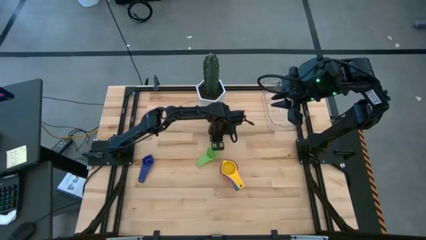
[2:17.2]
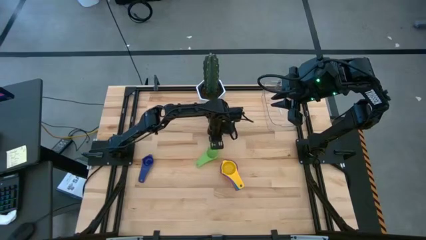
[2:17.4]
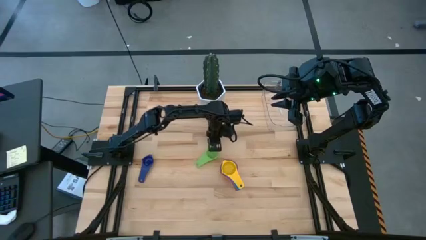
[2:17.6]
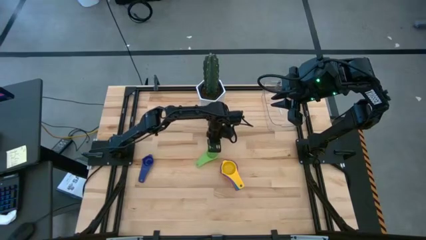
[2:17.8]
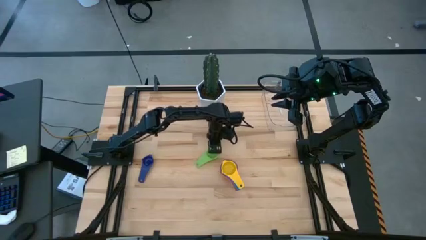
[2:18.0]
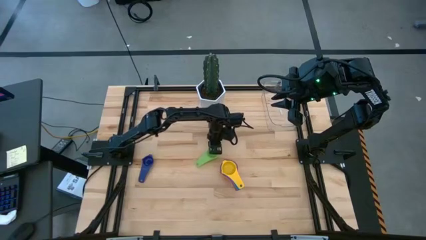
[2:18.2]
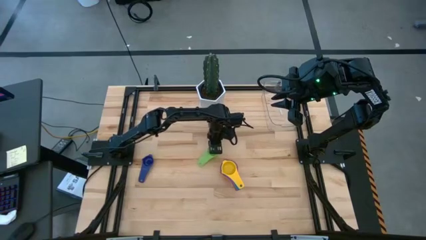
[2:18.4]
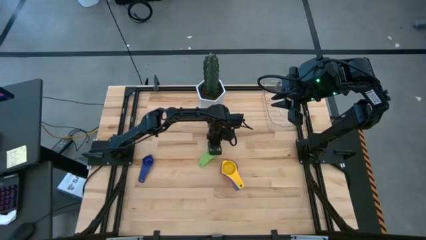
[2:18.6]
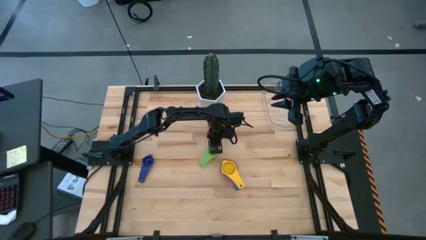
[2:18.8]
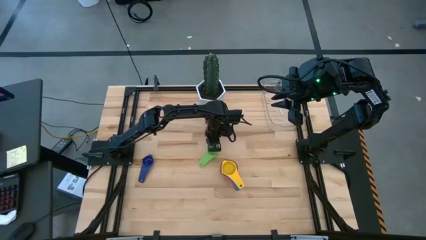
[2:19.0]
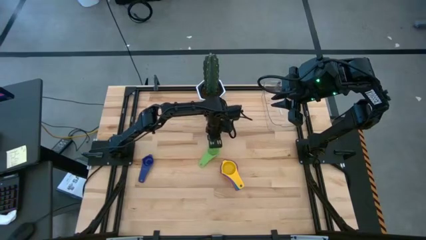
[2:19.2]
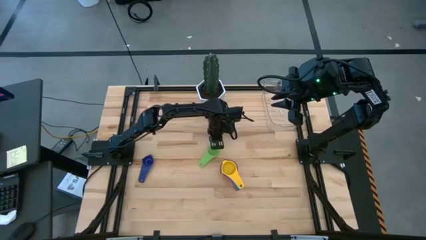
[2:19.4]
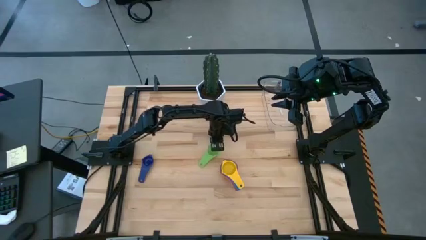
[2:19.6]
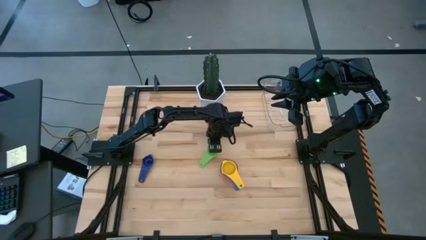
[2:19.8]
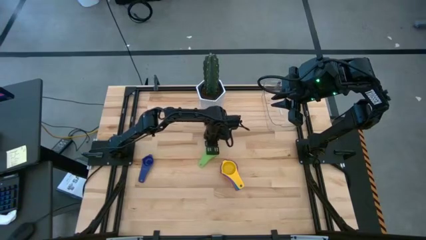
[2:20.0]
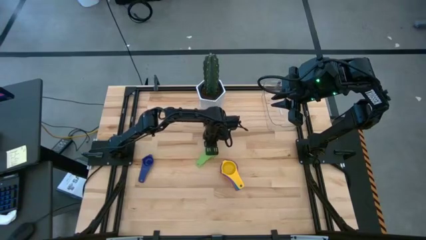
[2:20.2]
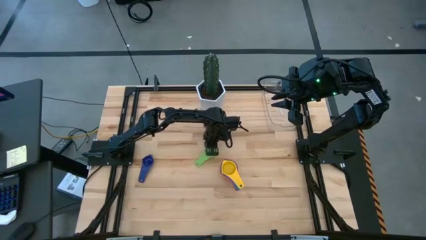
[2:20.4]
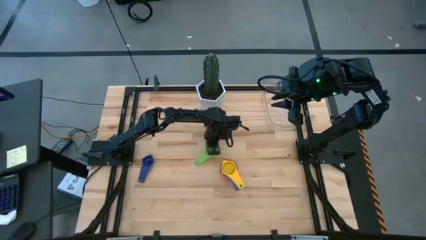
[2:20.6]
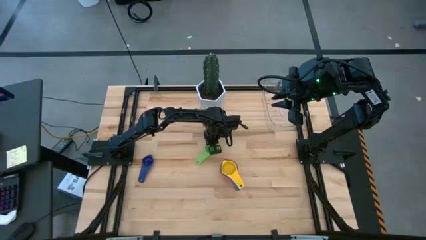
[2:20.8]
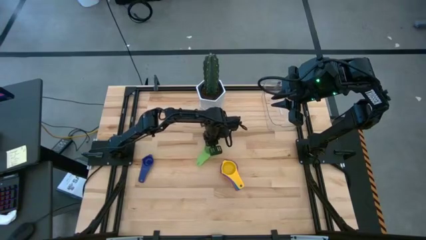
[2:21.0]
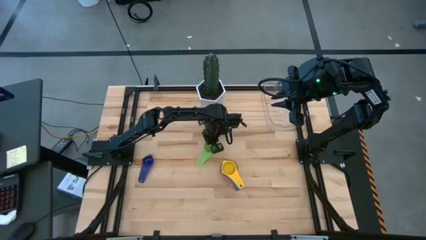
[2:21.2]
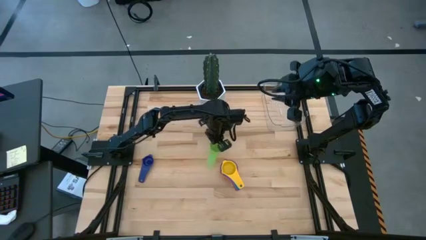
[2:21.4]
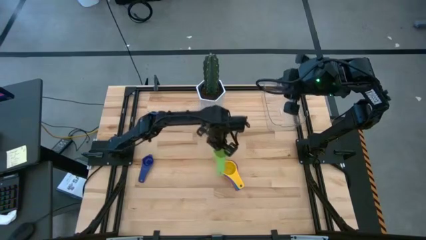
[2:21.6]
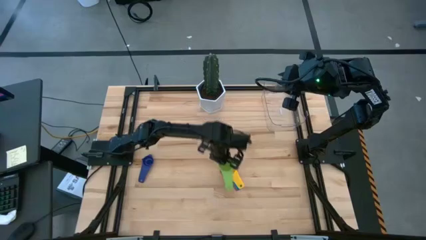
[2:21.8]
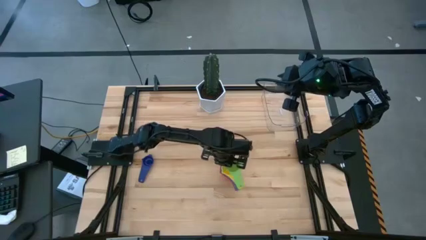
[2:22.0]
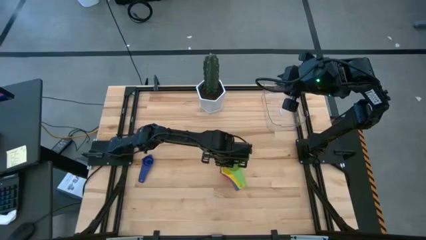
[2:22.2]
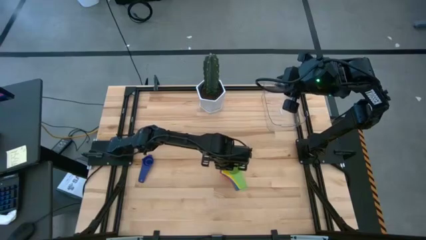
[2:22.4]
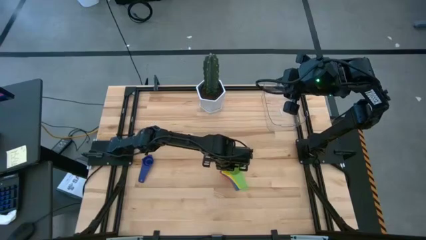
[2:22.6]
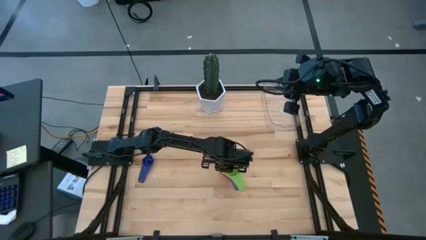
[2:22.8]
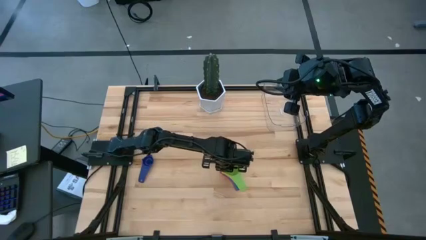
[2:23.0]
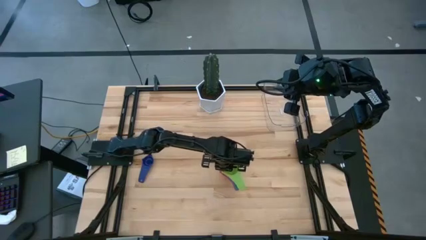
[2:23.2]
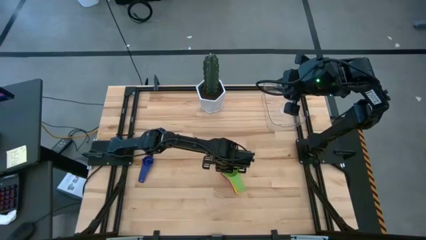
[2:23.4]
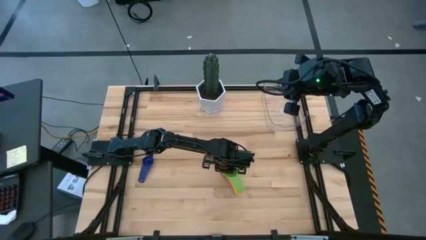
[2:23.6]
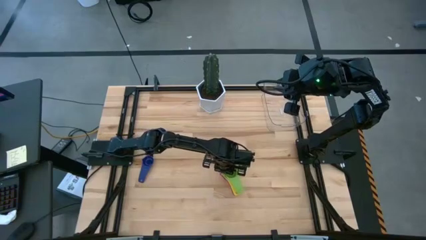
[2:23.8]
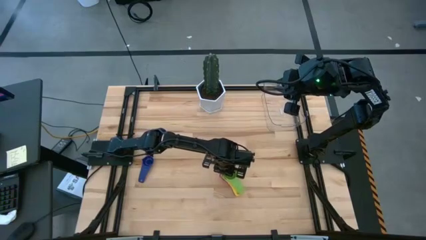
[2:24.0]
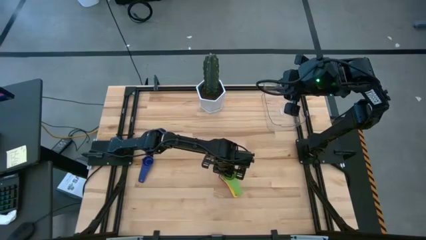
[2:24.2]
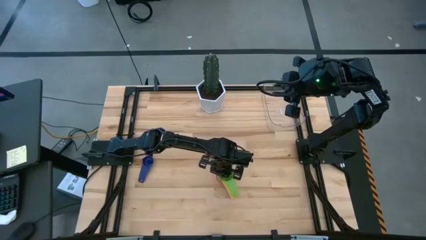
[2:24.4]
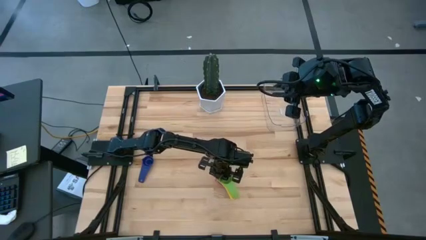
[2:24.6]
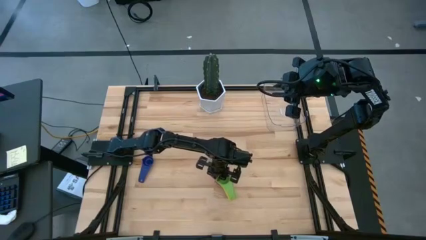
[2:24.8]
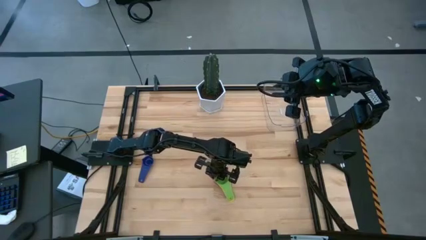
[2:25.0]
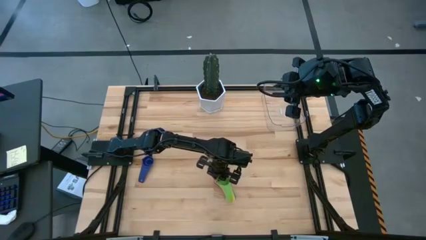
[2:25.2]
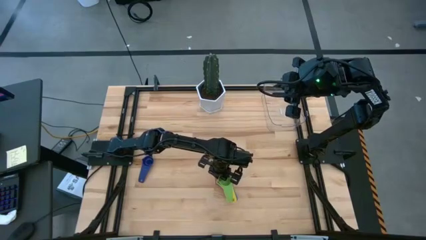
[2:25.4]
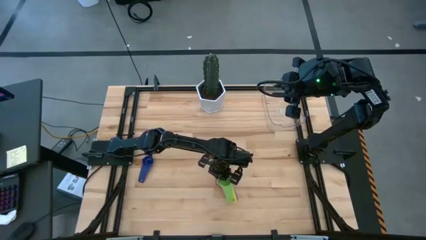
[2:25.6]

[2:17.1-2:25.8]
Task: Nest measuring cups in basket
Stack the green measuring cup on top of the yellow measuring cups

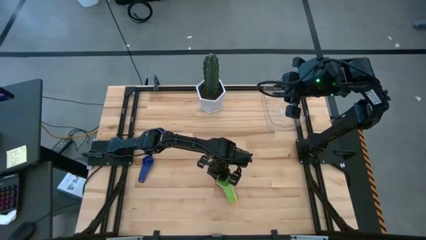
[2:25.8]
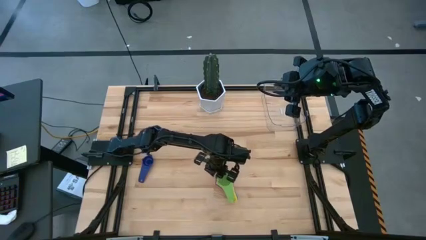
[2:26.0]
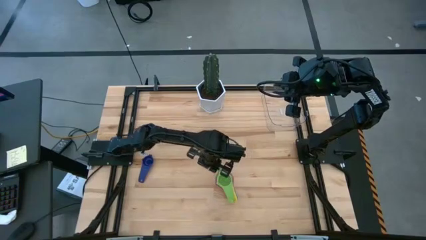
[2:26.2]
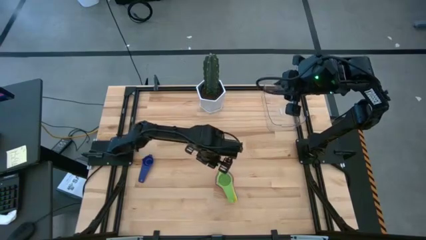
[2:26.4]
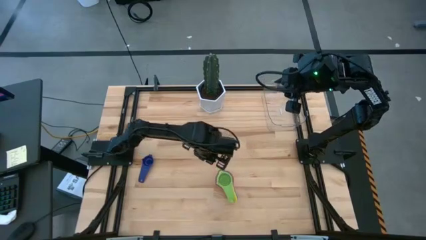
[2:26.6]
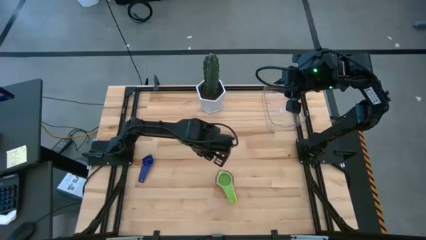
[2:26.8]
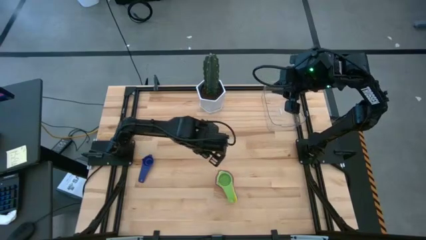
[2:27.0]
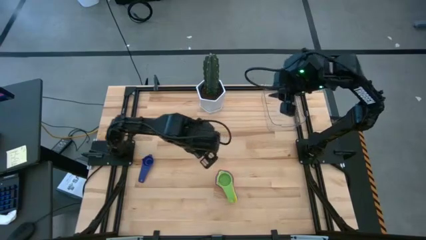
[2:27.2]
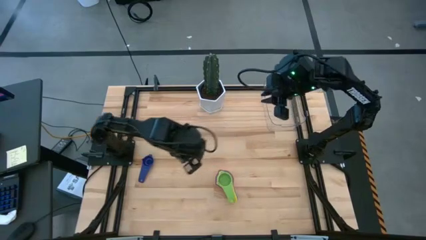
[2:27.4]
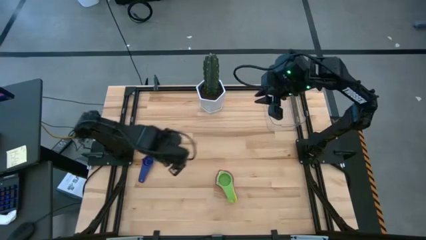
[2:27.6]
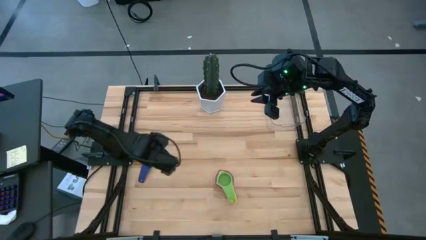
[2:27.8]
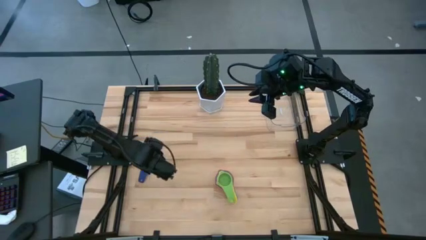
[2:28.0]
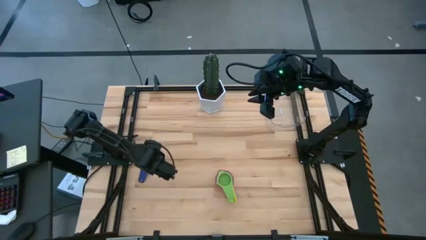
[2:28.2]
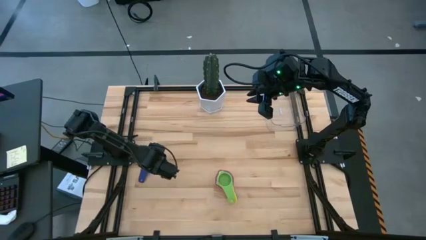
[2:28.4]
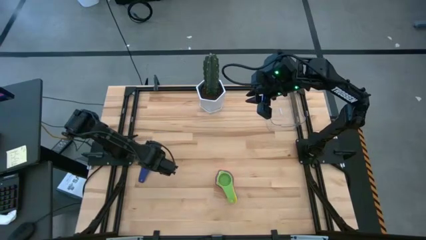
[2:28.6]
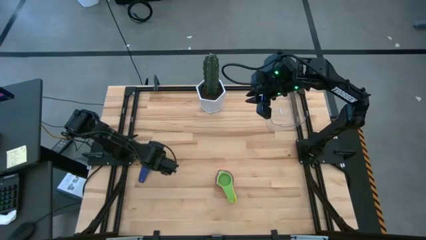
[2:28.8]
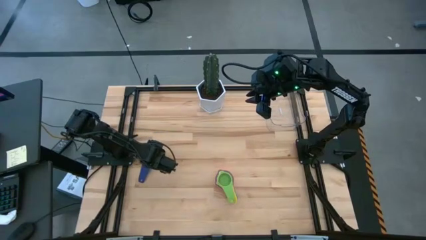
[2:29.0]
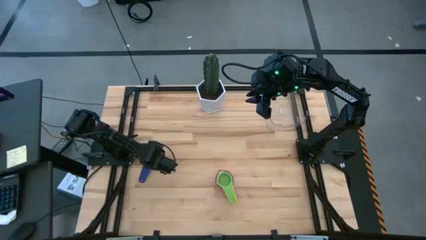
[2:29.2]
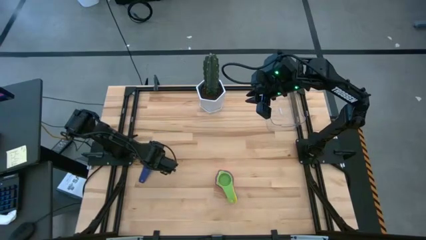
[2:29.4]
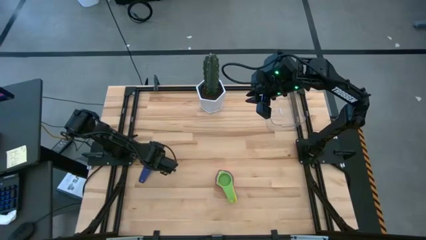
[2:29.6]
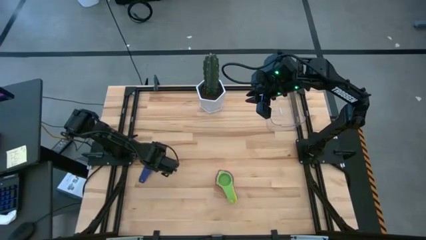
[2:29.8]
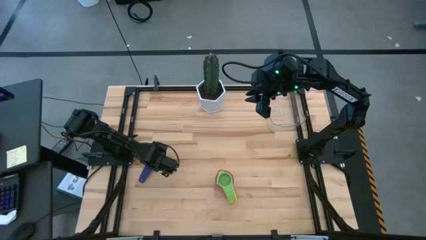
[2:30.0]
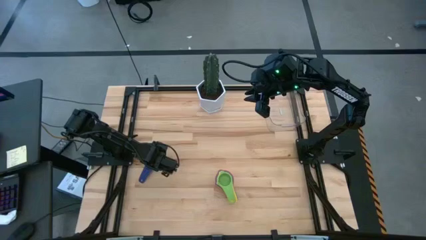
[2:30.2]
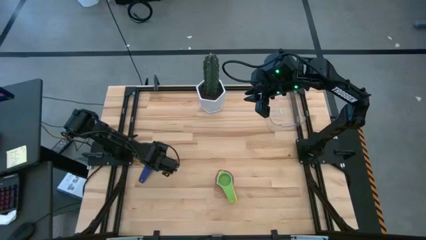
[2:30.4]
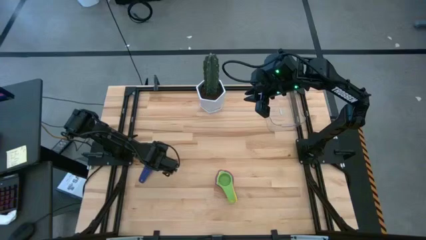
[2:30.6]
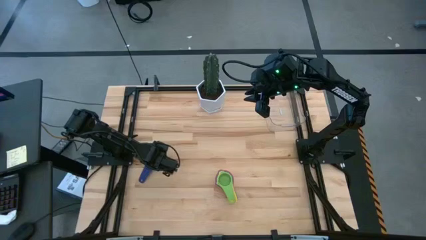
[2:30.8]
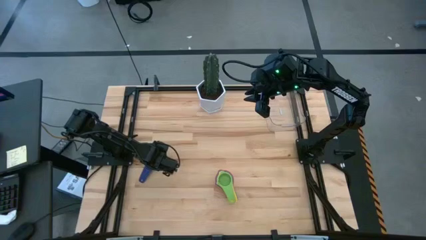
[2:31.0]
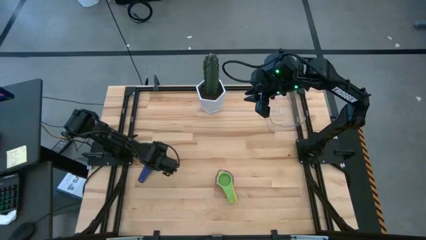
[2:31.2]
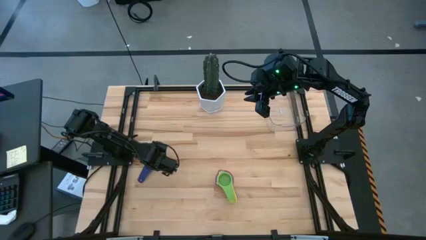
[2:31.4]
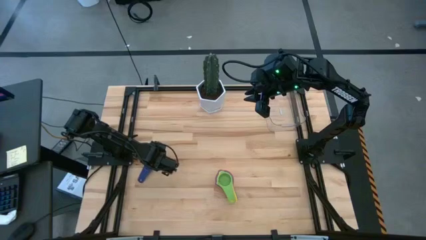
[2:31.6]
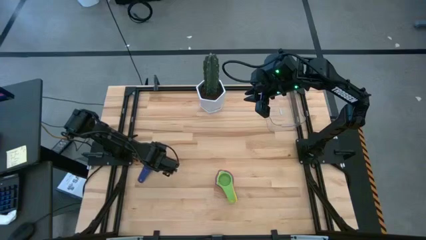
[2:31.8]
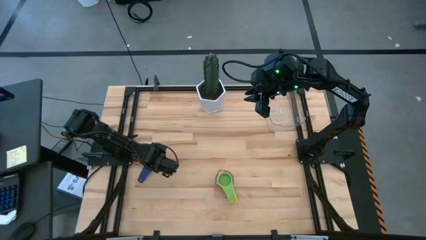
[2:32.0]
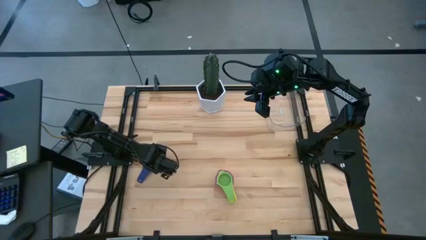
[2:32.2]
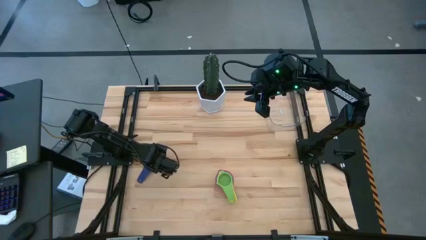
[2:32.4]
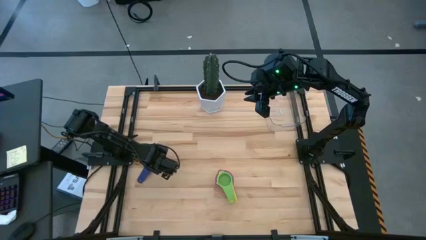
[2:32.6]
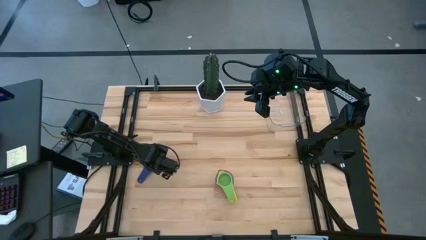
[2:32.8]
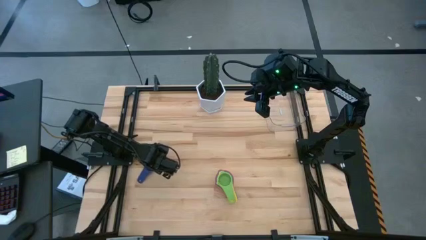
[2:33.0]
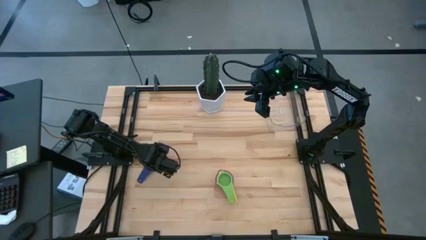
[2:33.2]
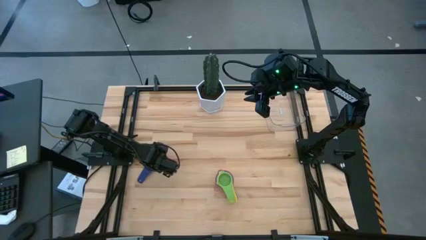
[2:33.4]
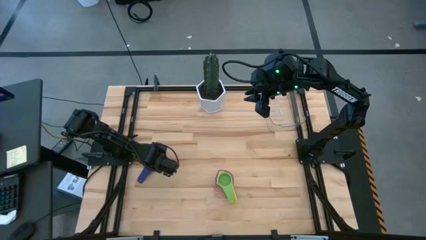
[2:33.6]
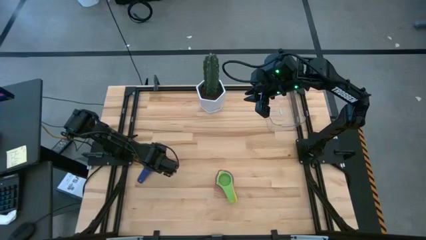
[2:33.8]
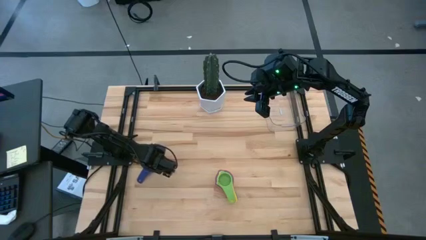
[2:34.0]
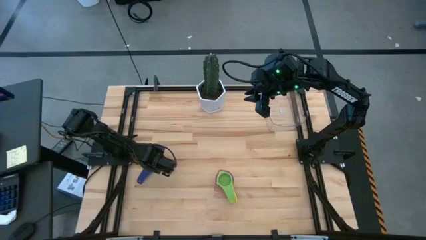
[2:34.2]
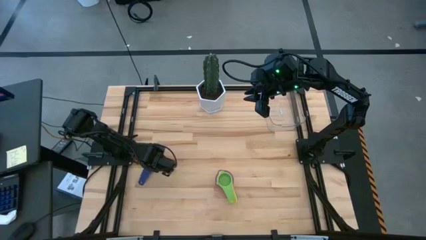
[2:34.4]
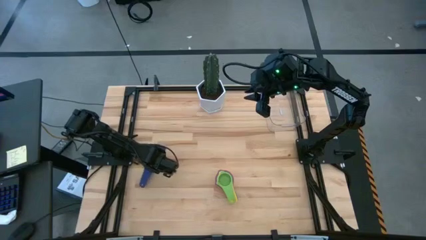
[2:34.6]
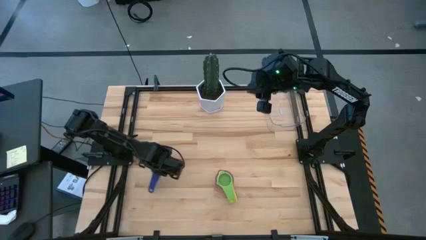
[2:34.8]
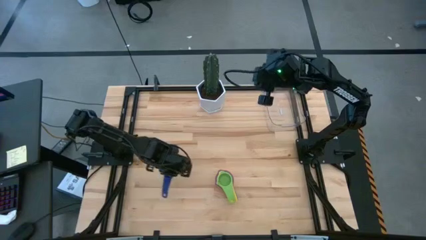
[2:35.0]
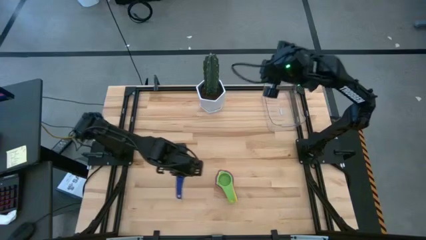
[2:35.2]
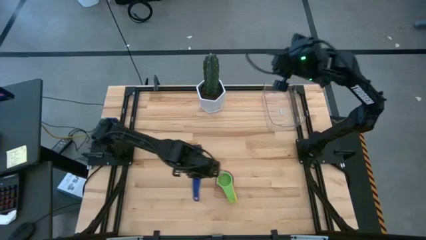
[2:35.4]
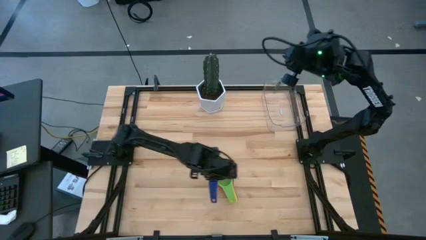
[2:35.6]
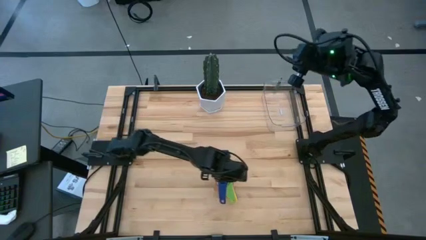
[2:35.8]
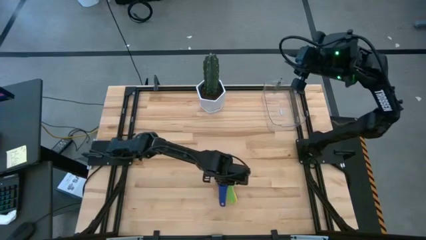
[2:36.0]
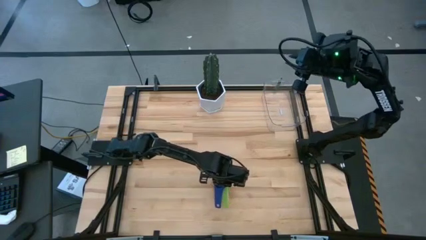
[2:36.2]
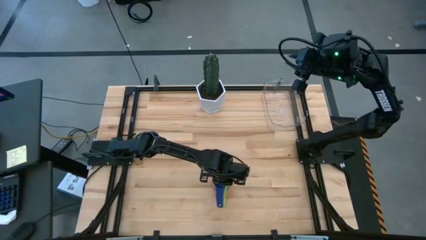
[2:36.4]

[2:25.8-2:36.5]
Put the dark blue measuring cup on top of the green measuring cup
